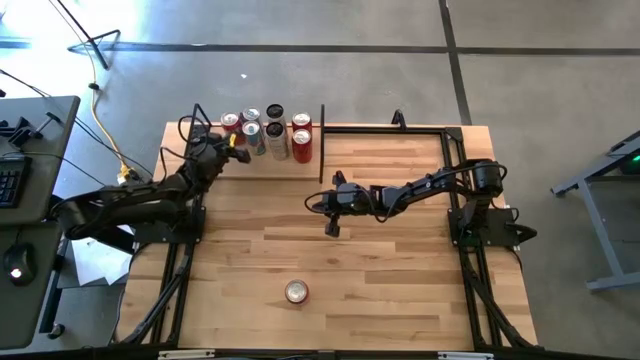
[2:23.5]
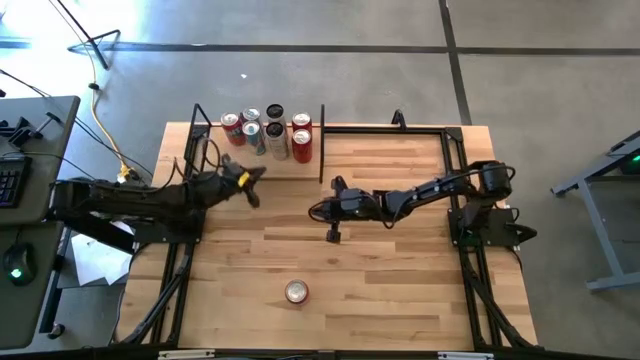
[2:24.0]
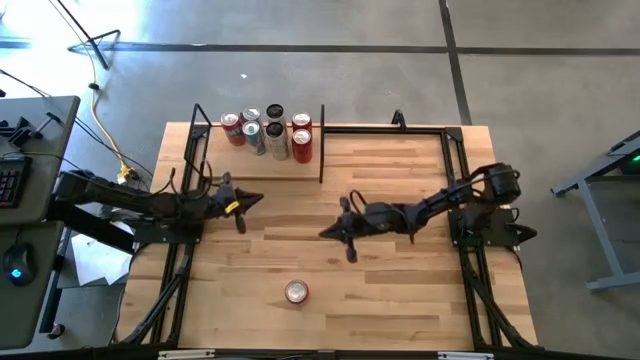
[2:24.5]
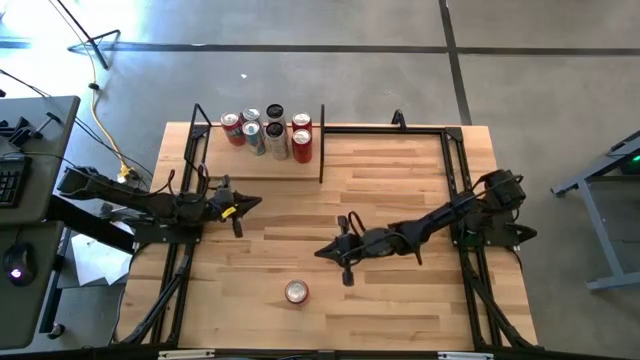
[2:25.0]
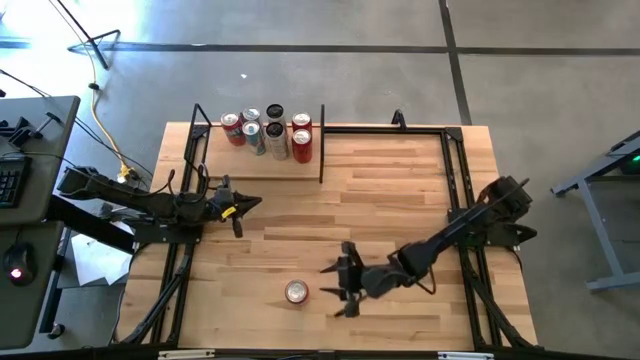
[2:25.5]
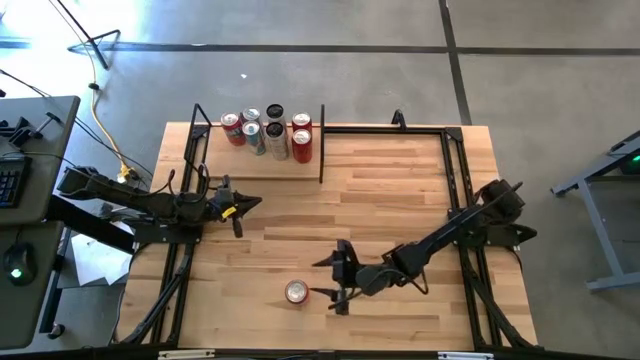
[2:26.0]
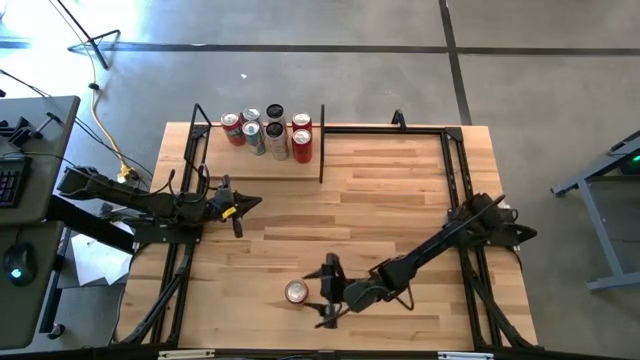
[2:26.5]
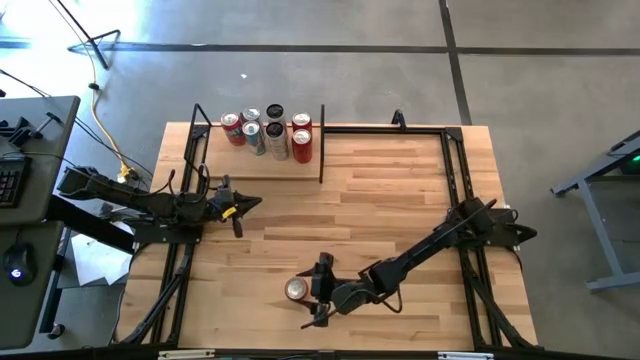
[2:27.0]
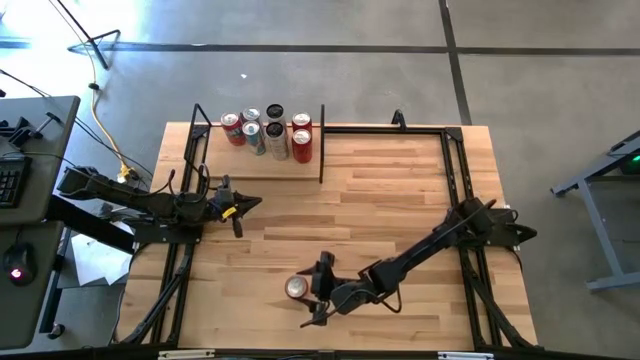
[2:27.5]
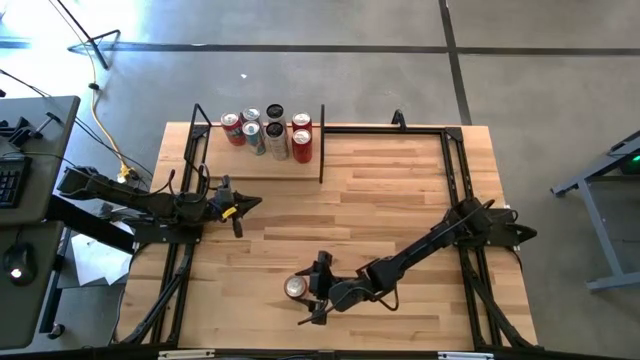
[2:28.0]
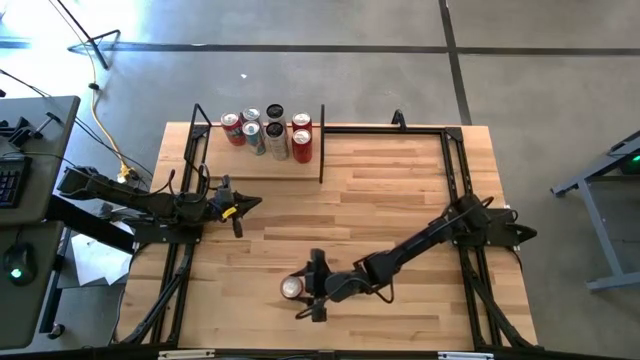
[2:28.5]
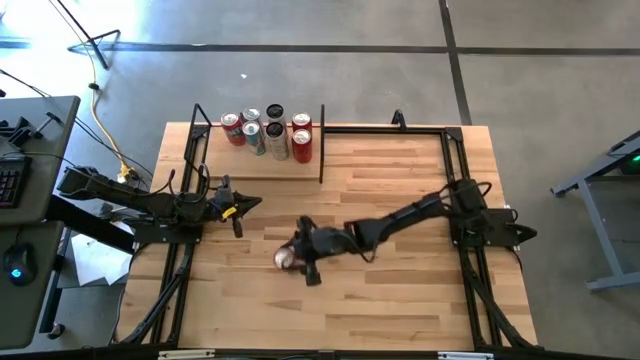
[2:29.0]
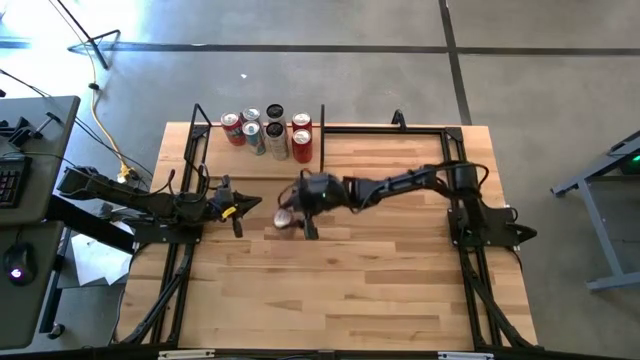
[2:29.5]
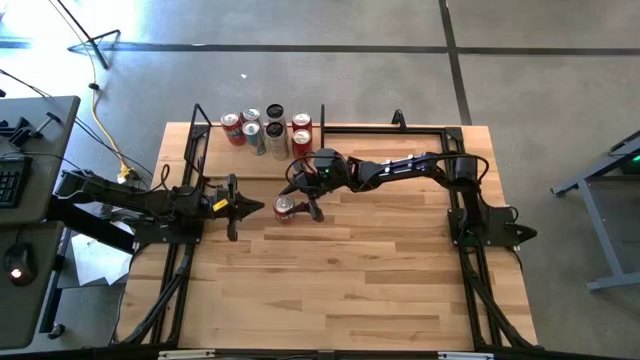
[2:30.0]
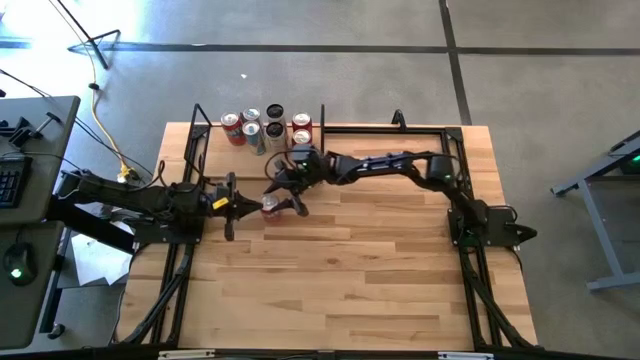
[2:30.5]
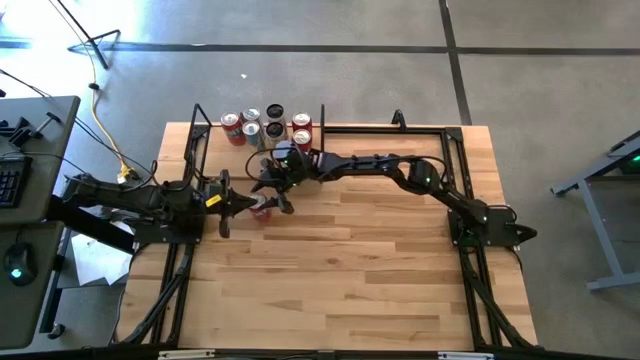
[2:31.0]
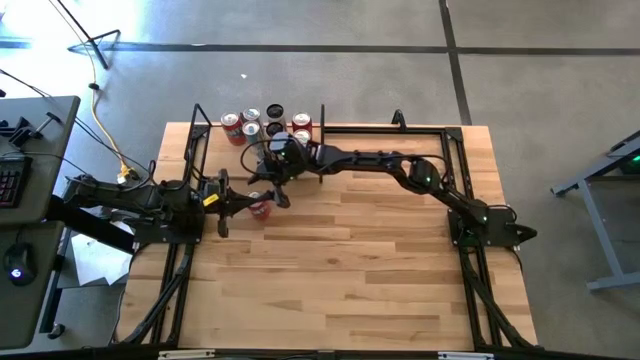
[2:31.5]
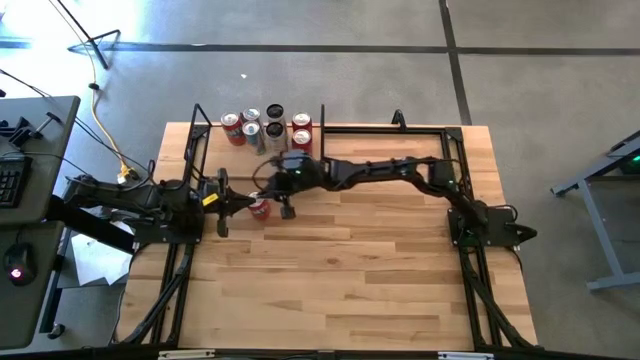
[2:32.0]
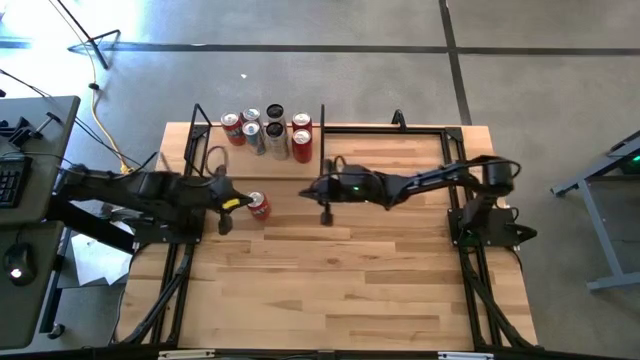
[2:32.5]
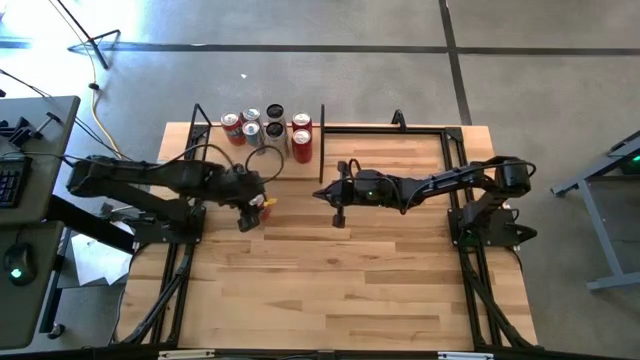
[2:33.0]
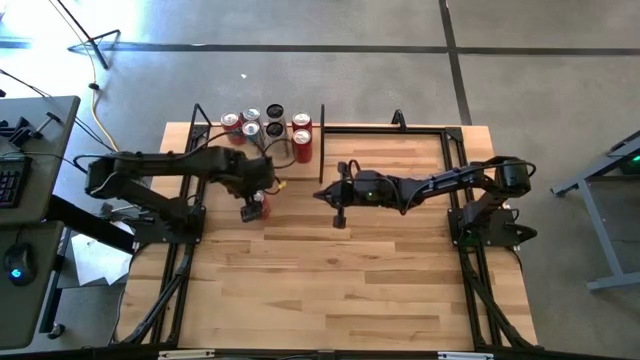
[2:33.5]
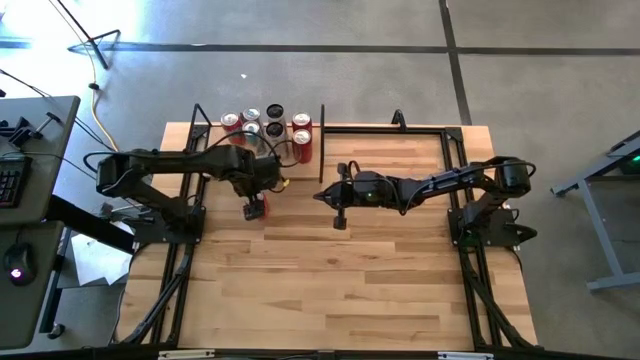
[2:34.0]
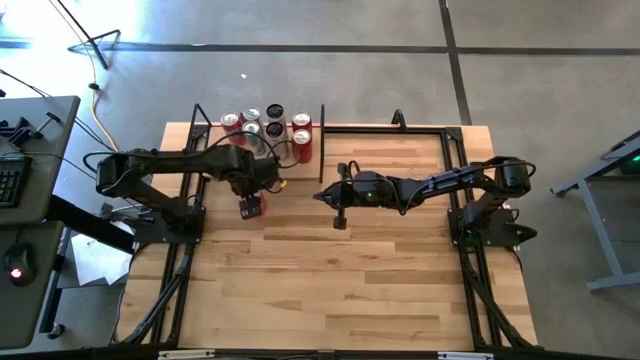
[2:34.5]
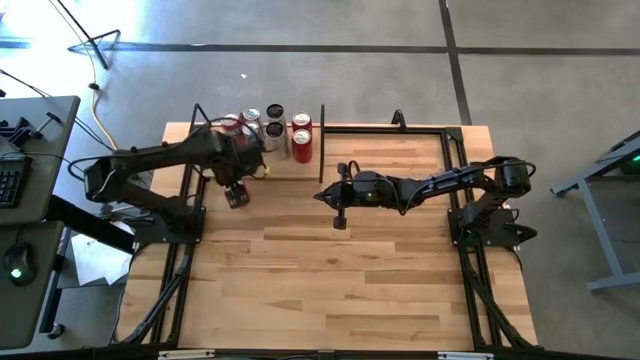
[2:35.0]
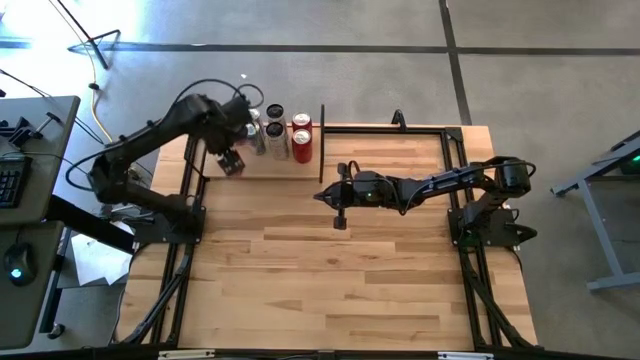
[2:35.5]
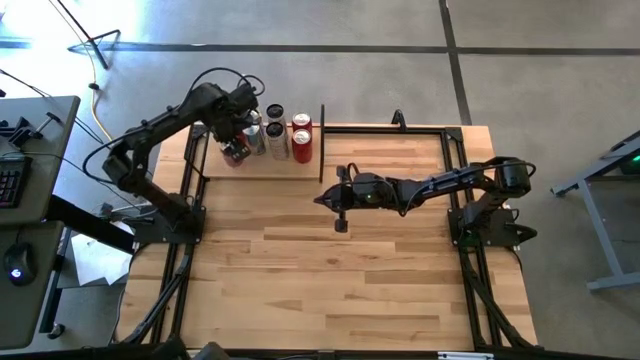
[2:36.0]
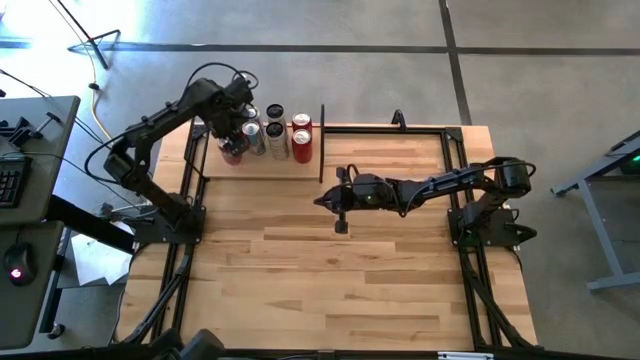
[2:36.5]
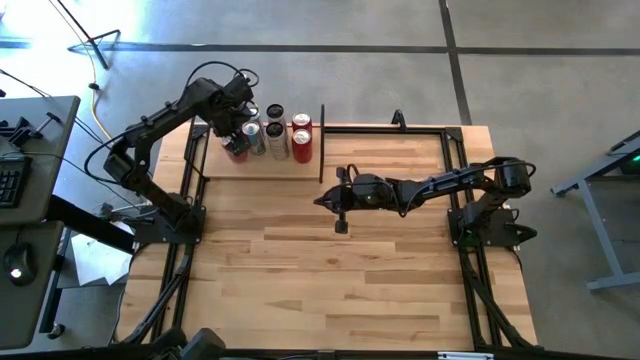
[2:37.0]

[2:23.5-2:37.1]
Task: Place canned beverage on shelf
Put the red soda can aligned with the other red soda can on the shelf

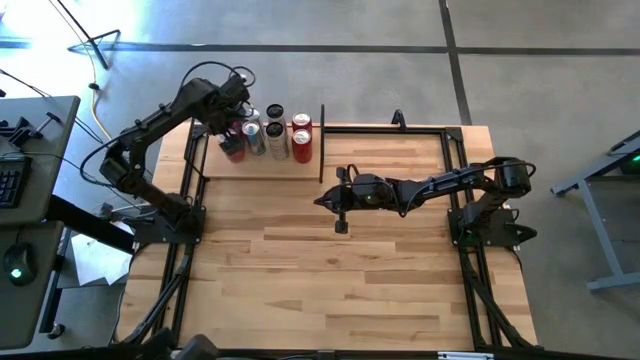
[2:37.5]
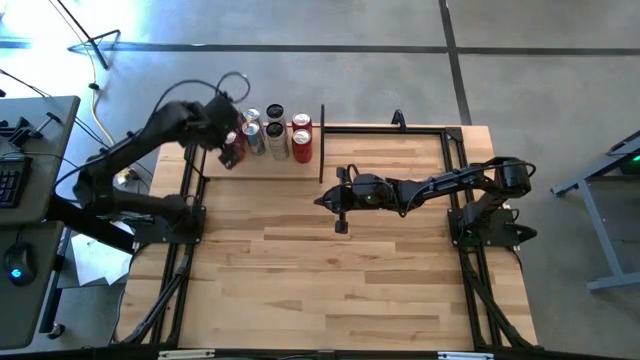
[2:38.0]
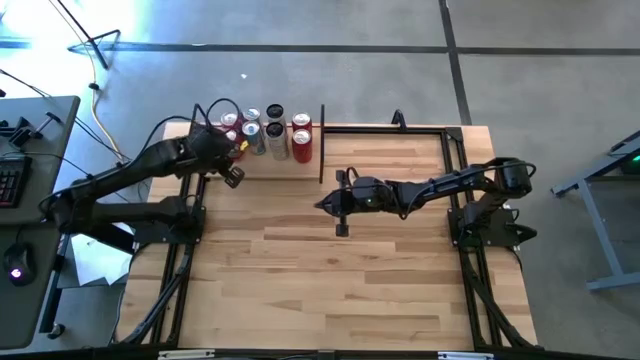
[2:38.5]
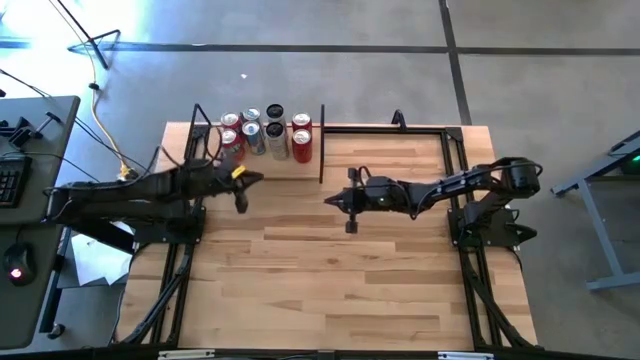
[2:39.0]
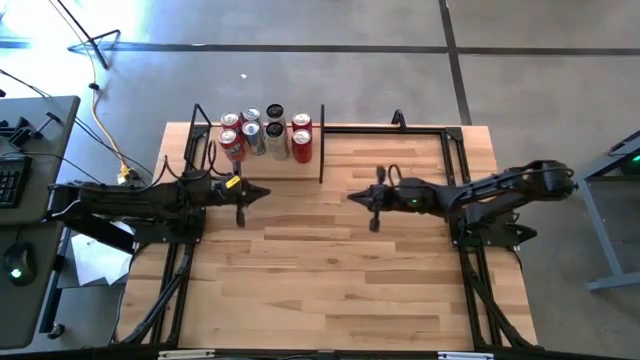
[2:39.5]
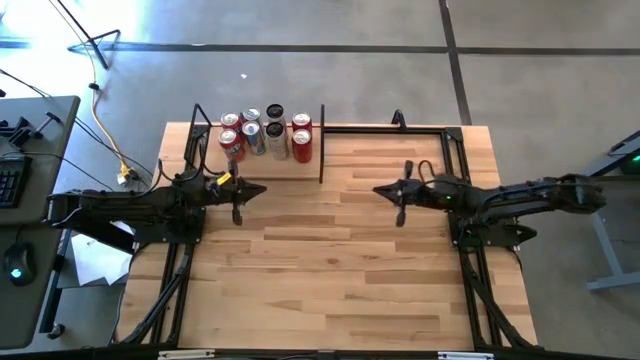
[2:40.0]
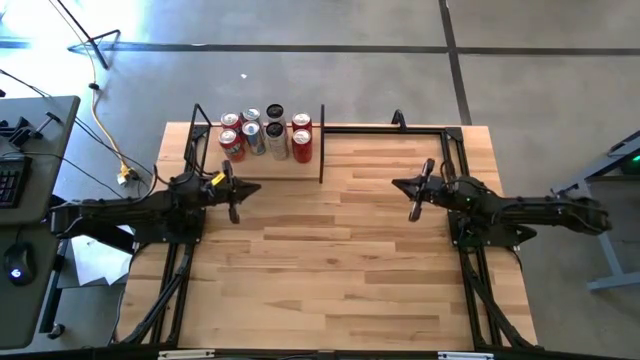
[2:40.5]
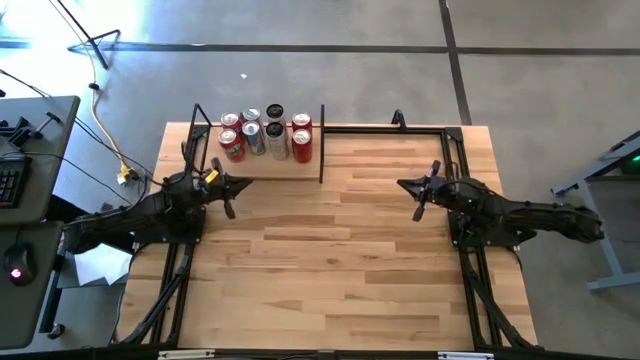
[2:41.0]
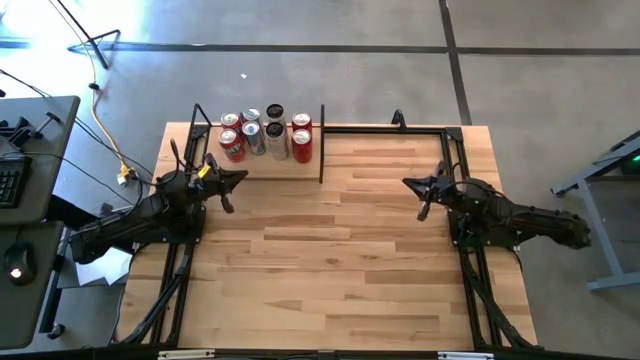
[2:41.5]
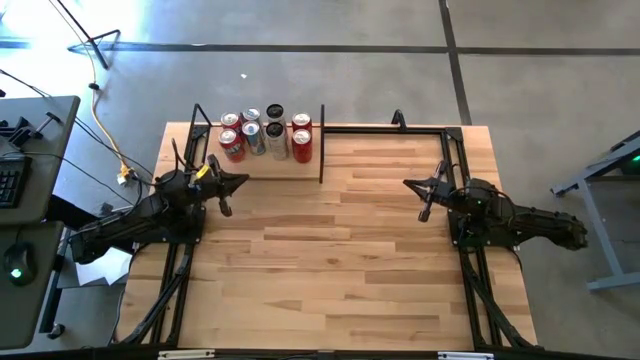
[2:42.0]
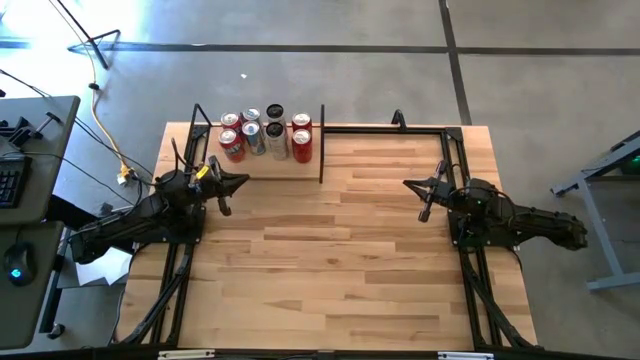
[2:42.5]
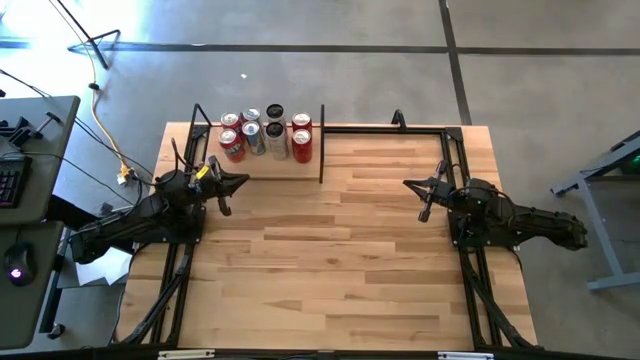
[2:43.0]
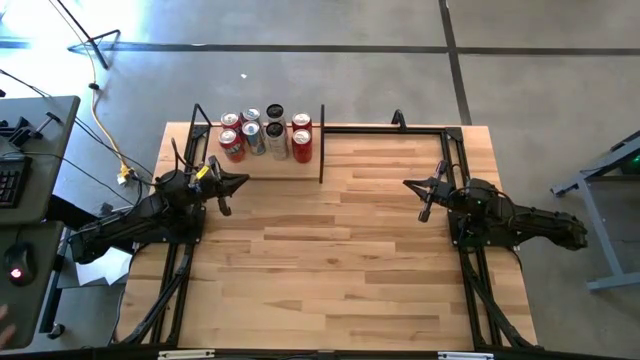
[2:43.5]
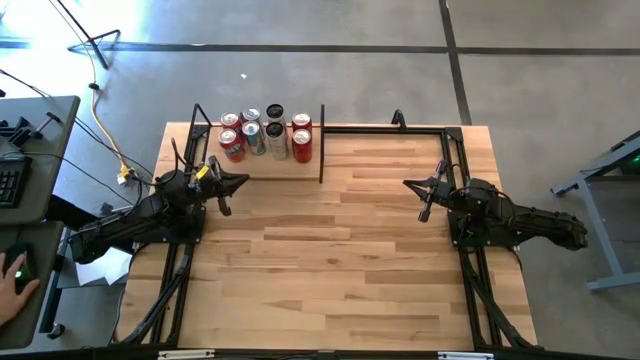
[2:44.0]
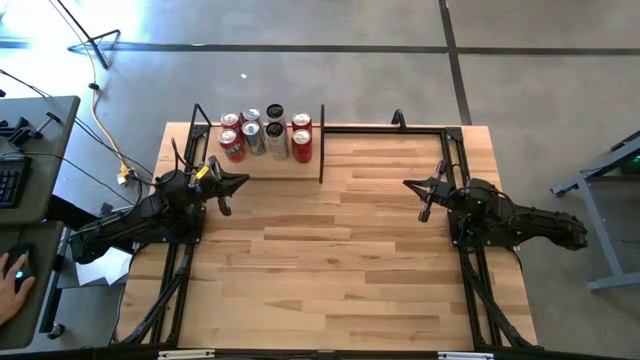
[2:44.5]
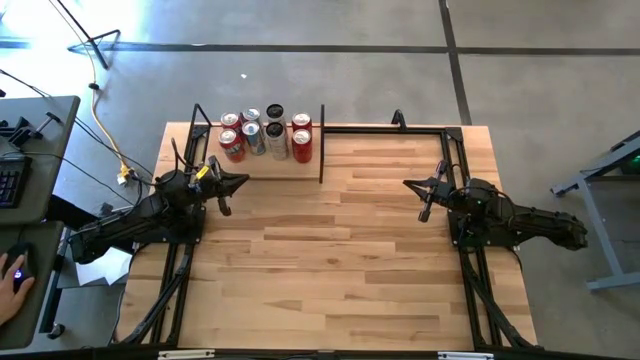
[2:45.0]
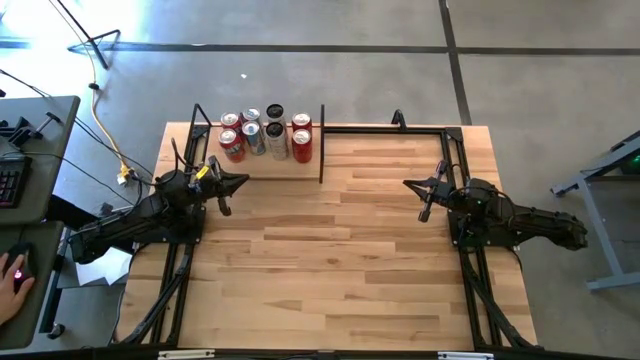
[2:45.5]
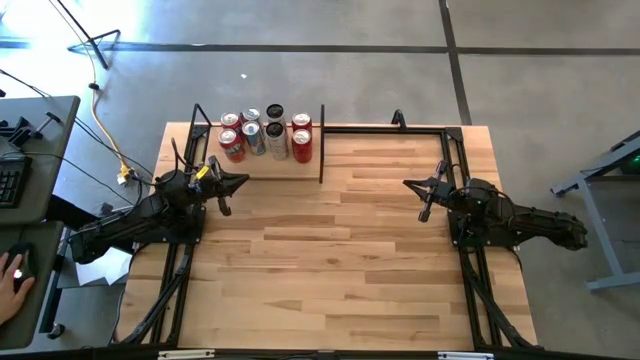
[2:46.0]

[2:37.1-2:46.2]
Return to Home Position
